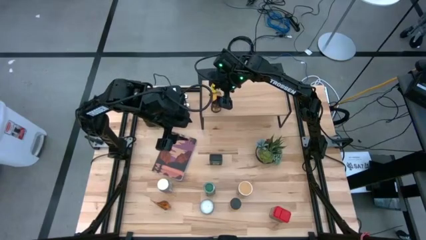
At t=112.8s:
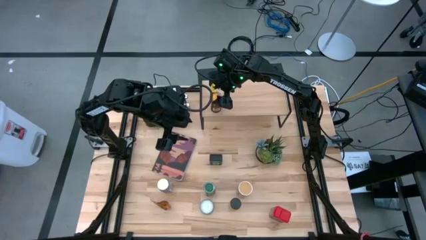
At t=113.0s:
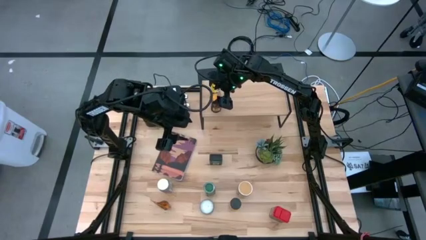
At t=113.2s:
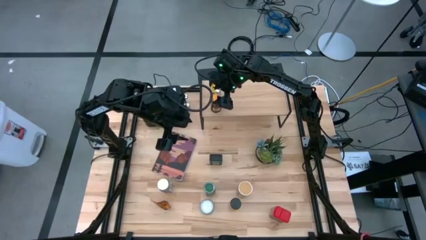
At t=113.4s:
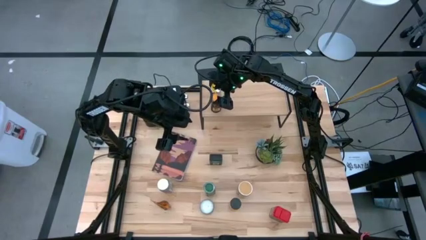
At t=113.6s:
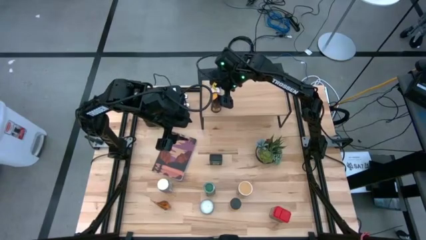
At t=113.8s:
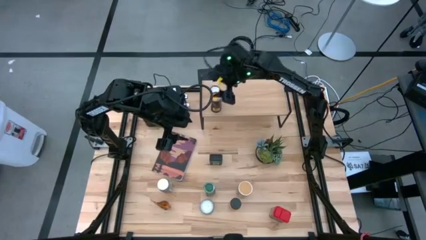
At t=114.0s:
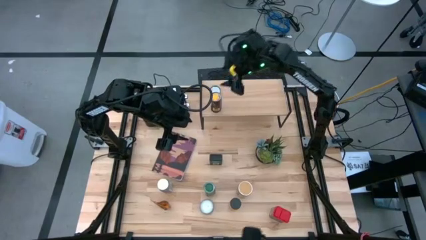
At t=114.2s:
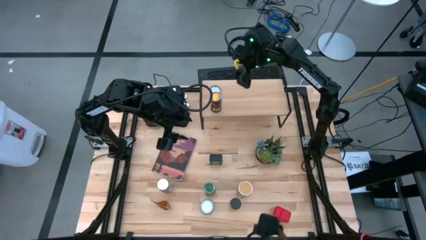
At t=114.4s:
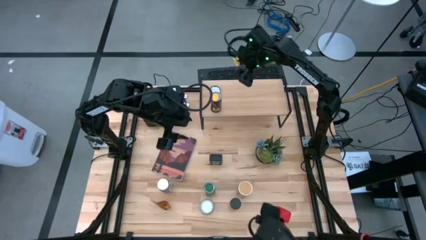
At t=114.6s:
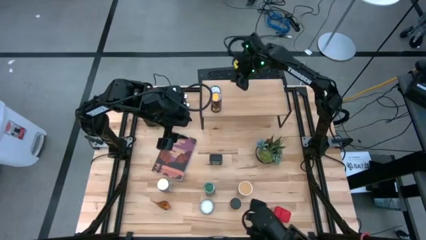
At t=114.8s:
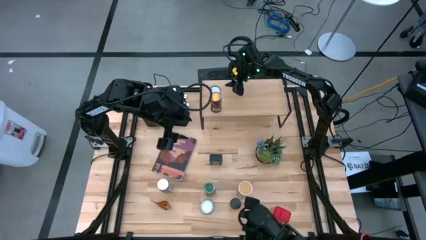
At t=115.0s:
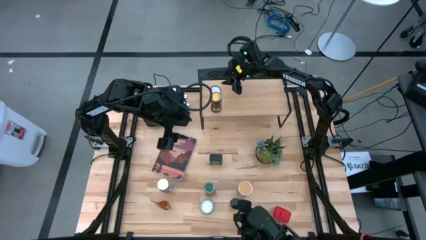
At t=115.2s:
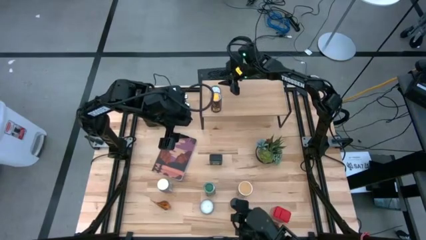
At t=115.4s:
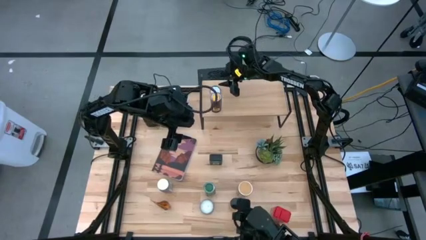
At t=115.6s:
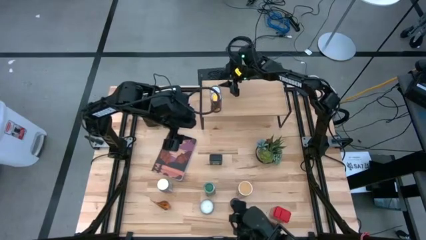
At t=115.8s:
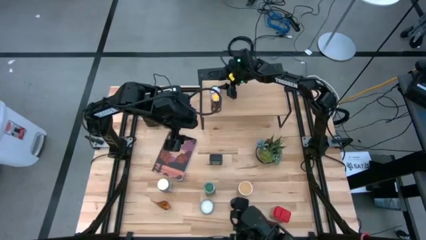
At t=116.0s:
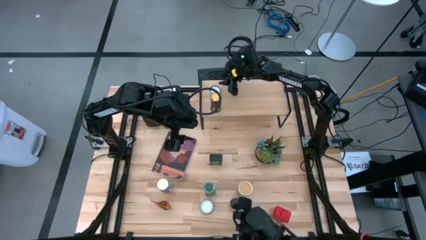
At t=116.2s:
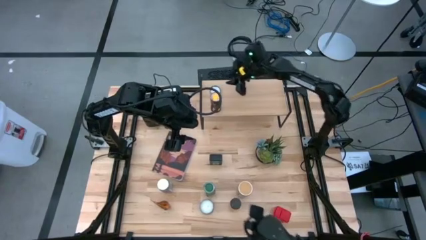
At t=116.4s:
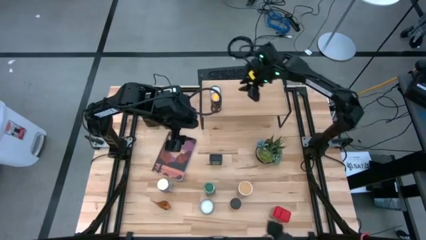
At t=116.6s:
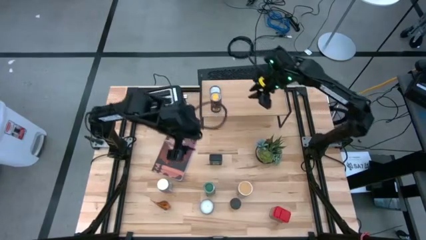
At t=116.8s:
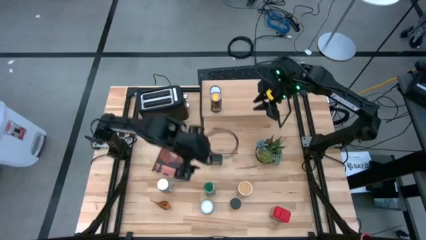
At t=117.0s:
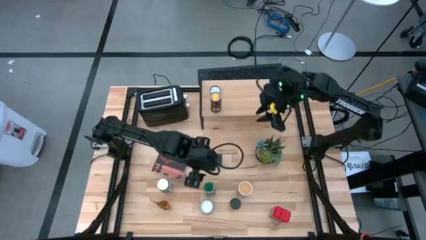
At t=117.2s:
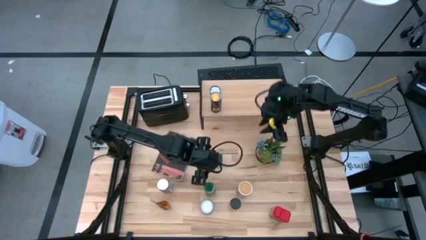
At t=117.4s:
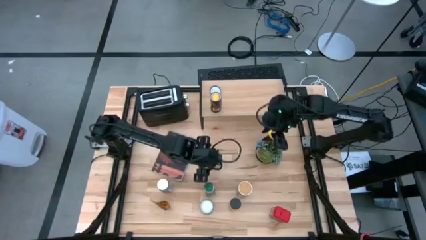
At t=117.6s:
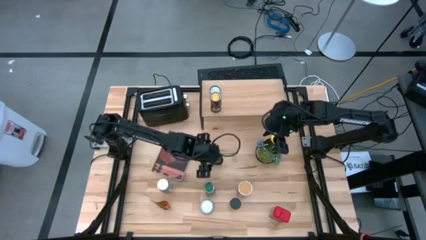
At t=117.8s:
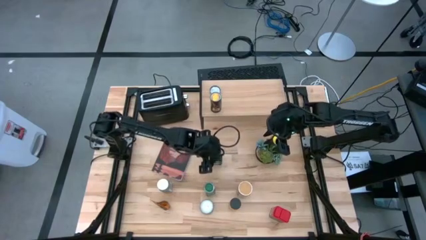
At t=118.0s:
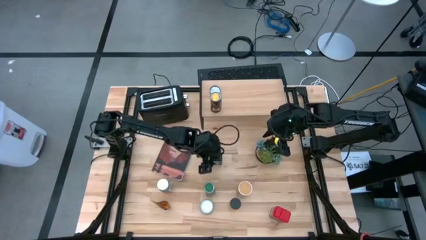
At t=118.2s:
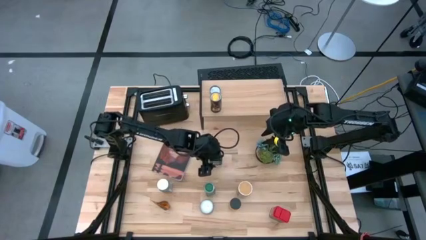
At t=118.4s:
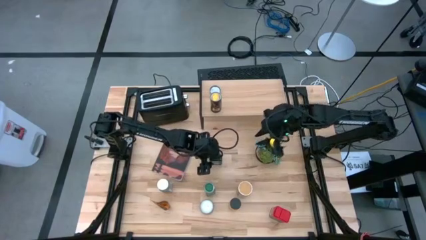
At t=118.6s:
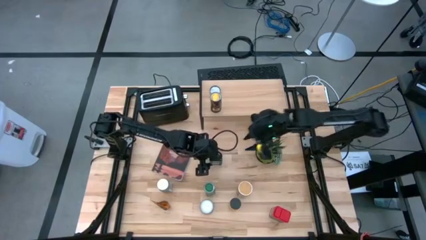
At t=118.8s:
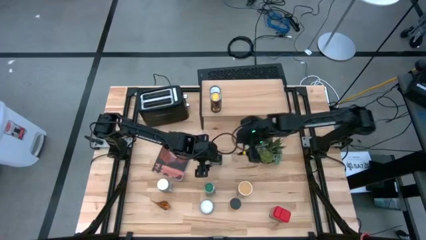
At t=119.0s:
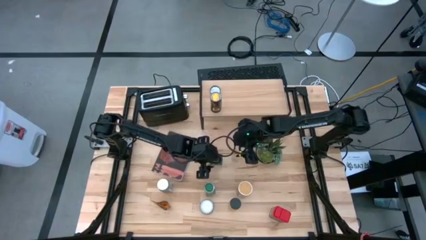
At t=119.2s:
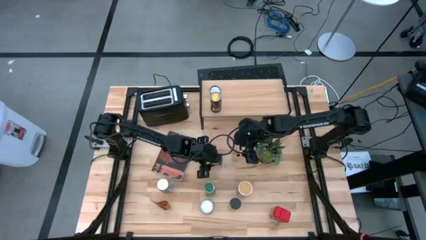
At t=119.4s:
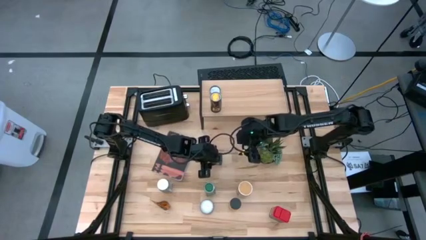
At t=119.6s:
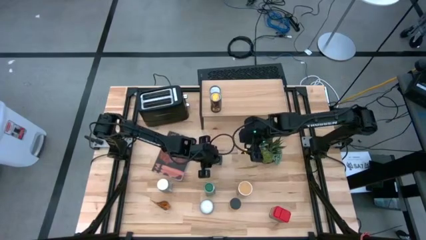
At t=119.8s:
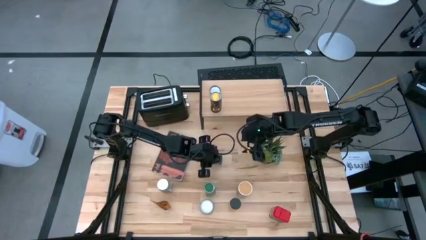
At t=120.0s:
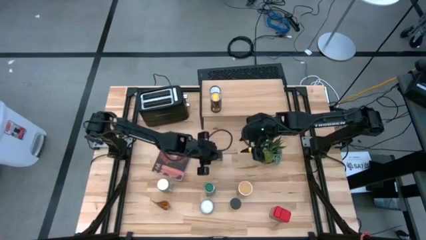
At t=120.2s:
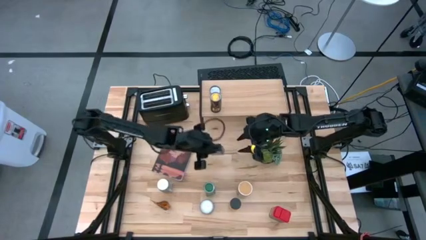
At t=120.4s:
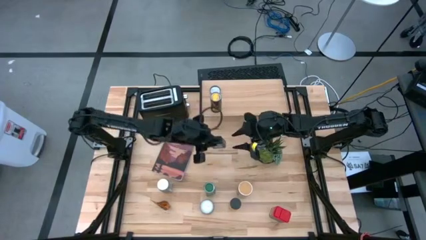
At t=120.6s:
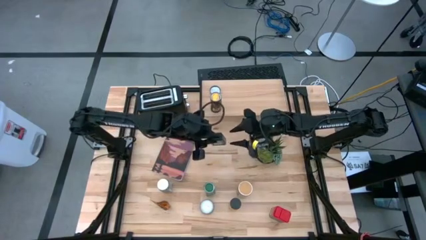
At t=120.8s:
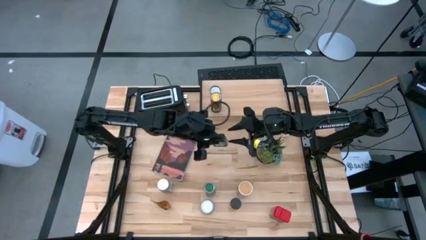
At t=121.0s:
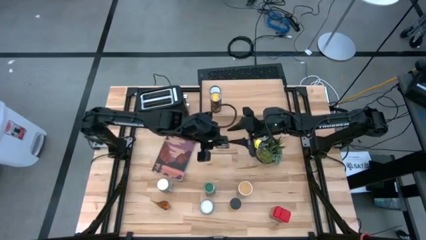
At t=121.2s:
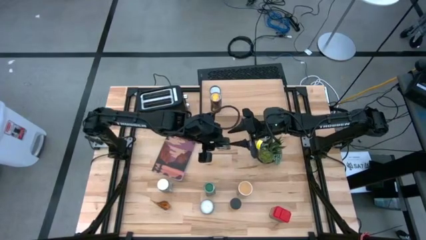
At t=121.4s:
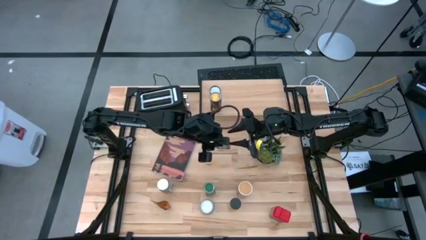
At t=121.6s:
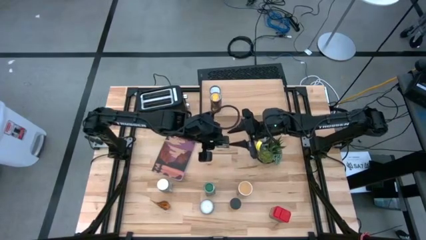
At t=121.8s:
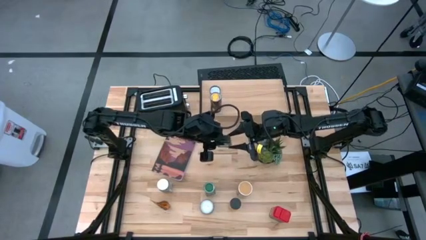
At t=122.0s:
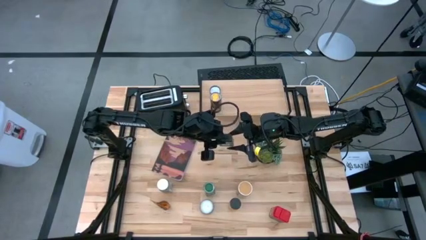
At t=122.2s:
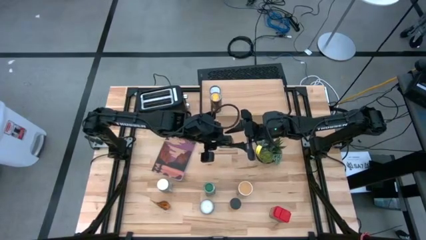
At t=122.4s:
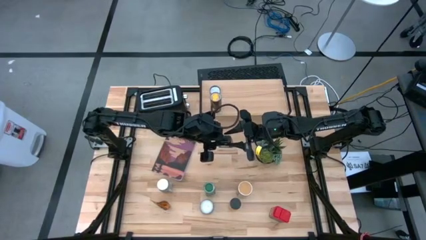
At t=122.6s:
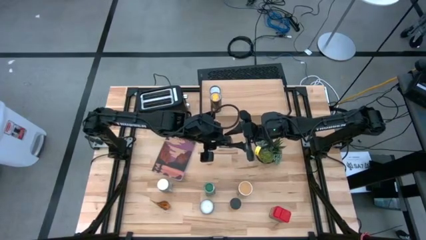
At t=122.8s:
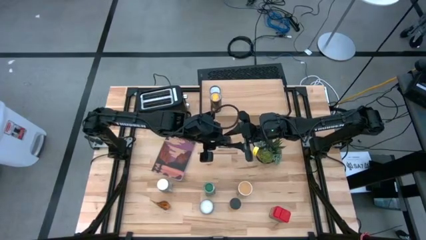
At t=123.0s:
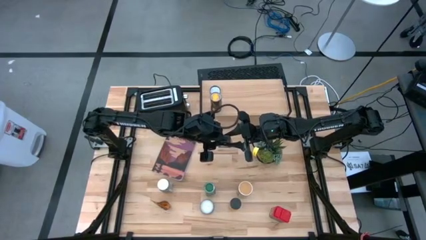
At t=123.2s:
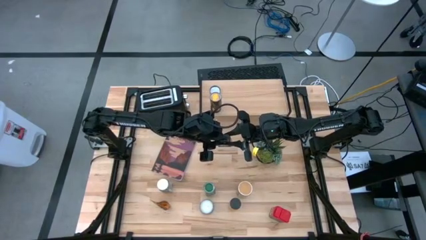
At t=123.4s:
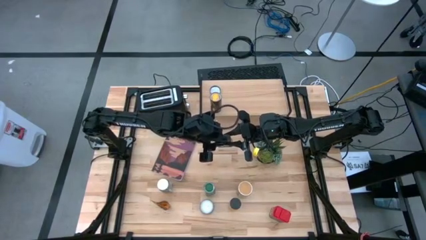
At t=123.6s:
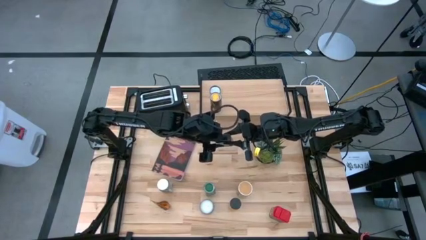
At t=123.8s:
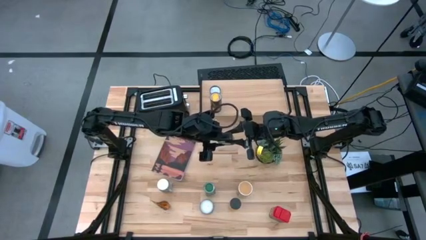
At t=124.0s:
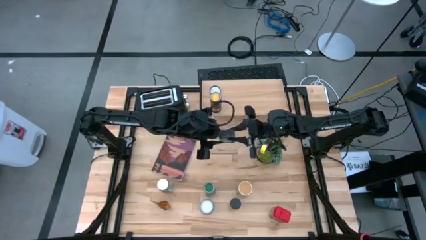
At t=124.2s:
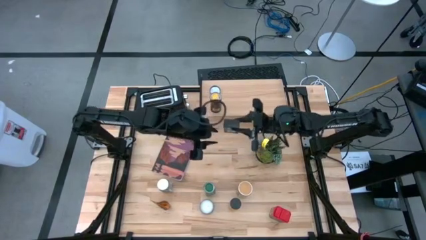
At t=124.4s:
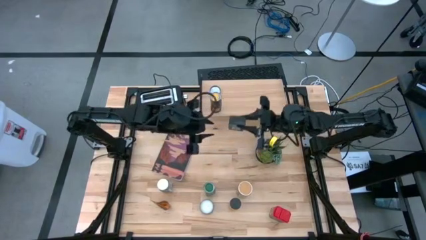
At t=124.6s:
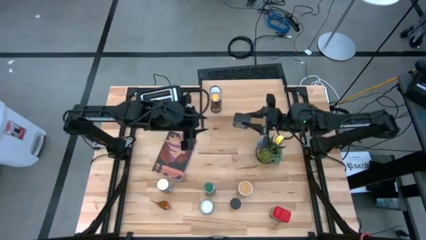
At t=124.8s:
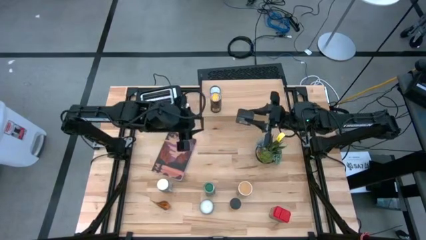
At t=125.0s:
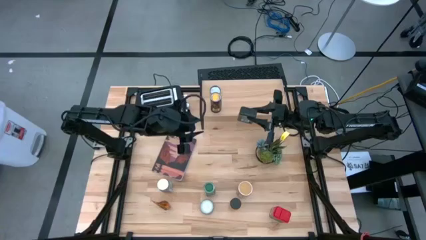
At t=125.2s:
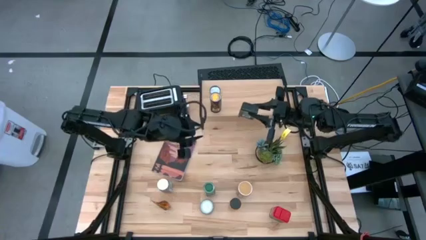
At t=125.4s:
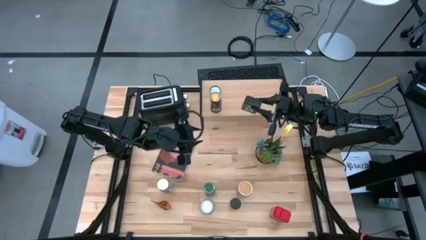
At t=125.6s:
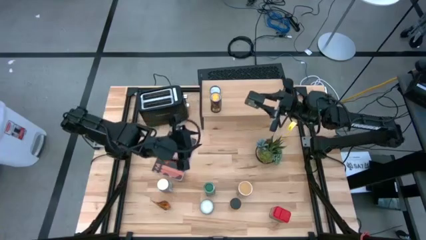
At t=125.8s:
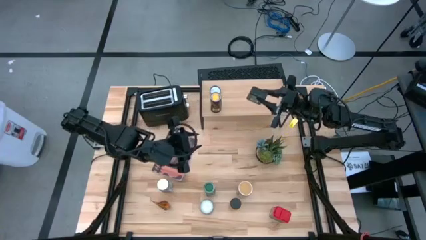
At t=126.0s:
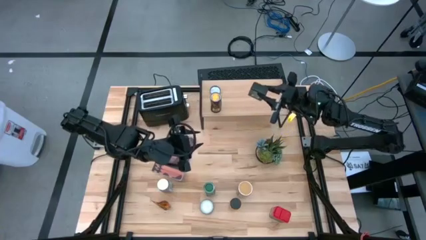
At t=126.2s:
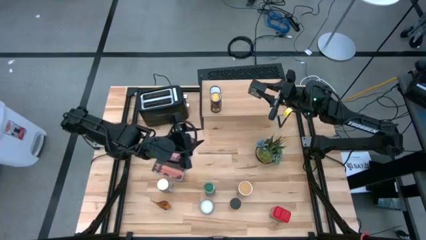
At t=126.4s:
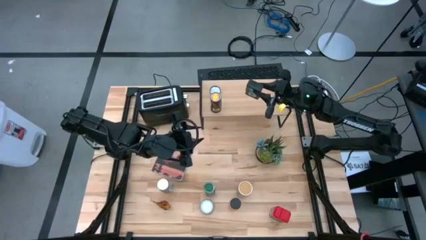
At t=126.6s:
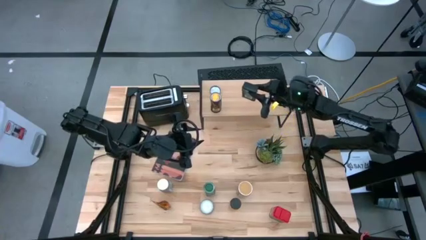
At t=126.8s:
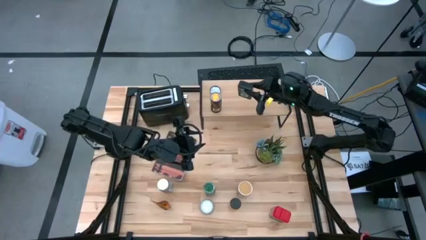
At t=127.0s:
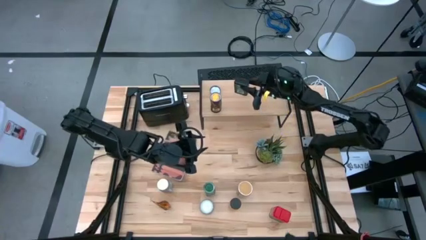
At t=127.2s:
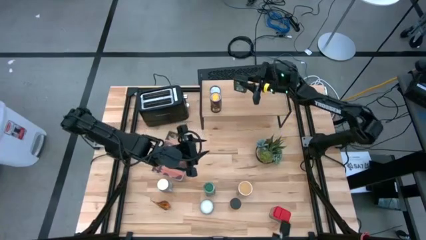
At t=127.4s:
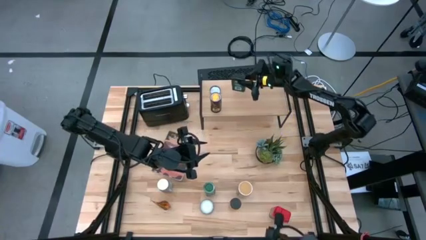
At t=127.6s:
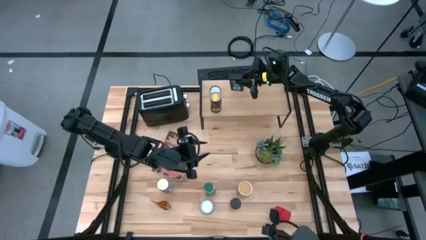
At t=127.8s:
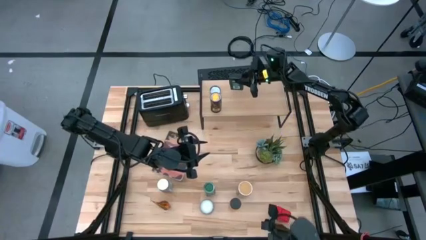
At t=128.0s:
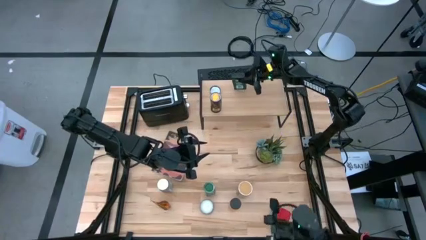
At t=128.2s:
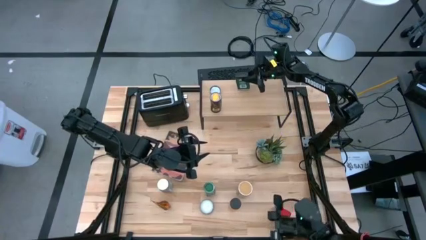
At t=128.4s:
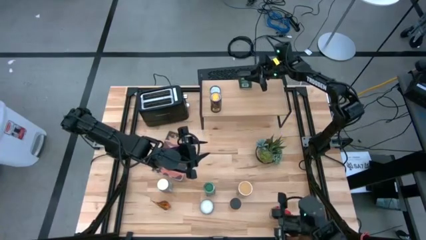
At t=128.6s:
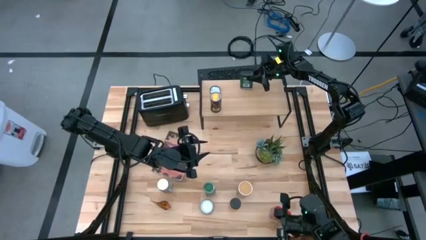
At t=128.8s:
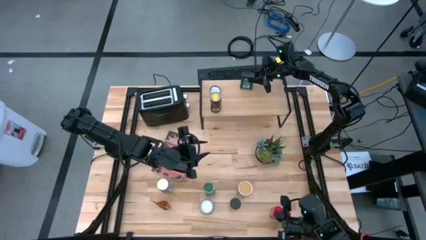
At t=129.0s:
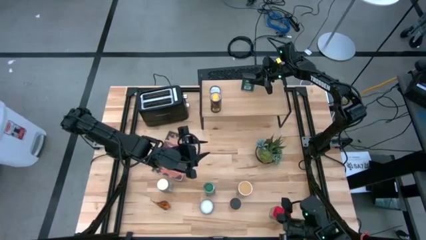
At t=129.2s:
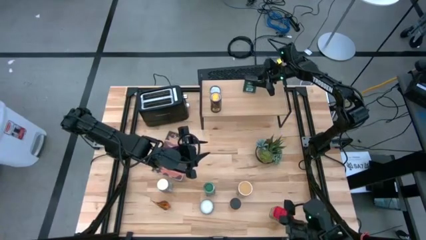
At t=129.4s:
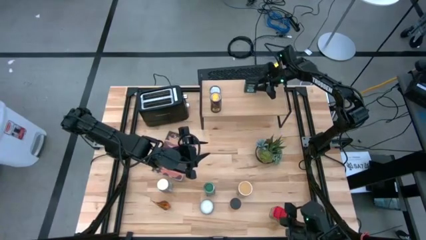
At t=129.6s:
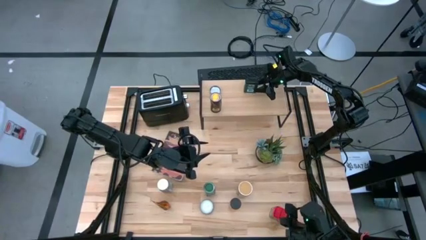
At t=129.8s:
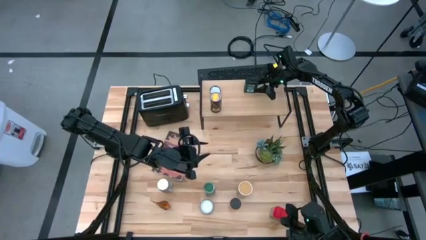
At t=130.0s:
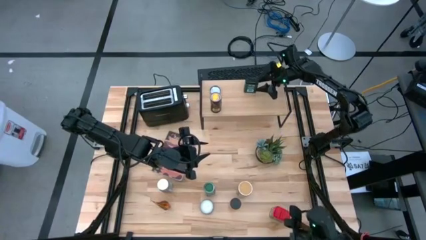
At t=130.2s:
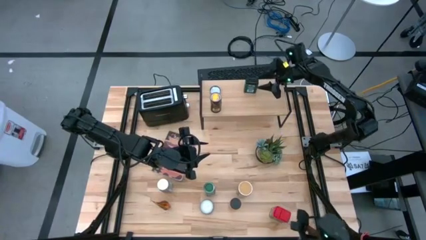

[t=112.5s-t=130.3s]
Task: Shelf spices
Put the black seasoning can on the shelf
